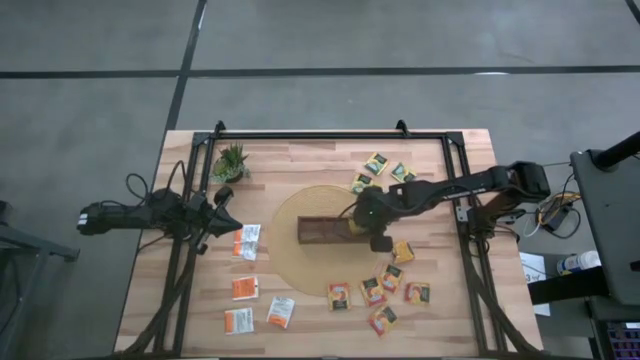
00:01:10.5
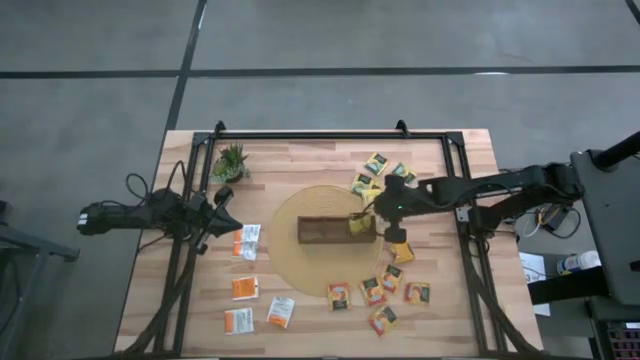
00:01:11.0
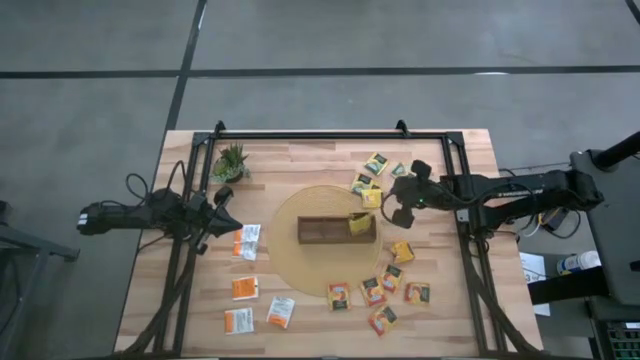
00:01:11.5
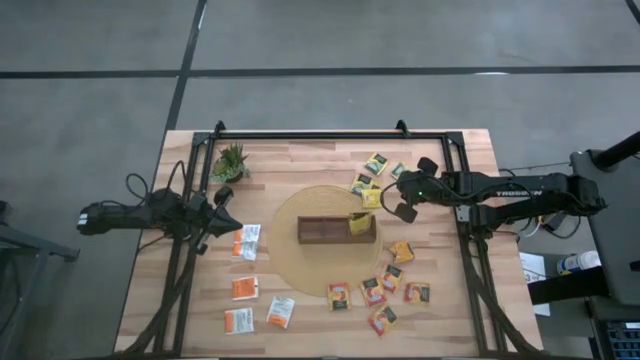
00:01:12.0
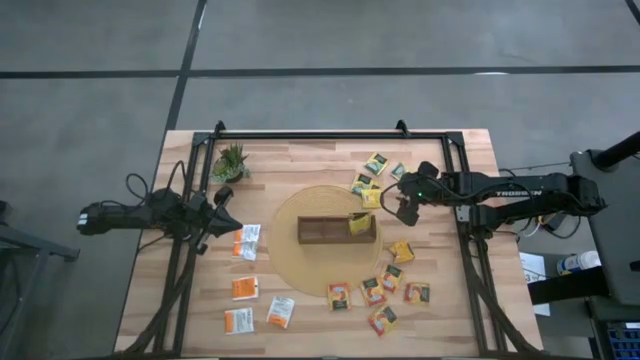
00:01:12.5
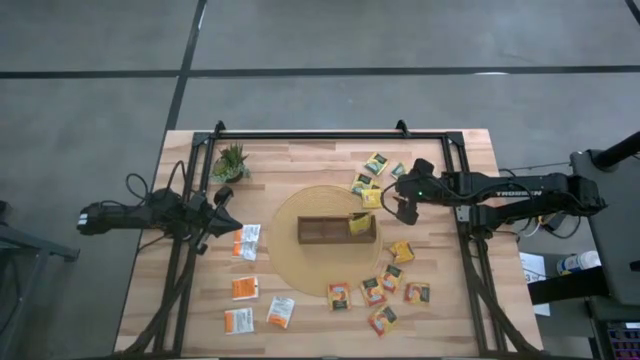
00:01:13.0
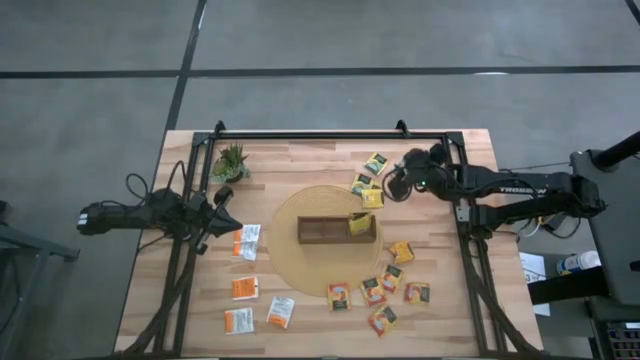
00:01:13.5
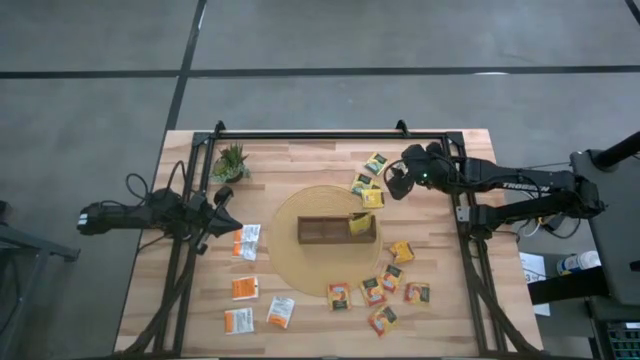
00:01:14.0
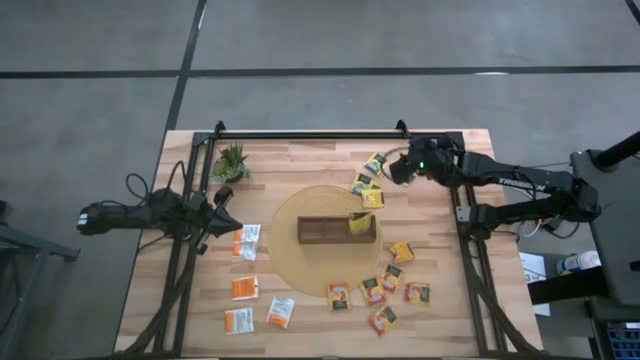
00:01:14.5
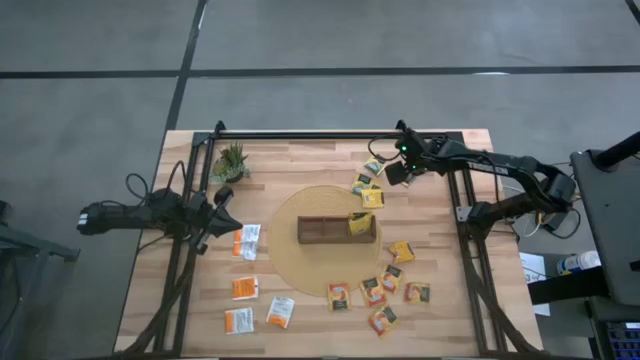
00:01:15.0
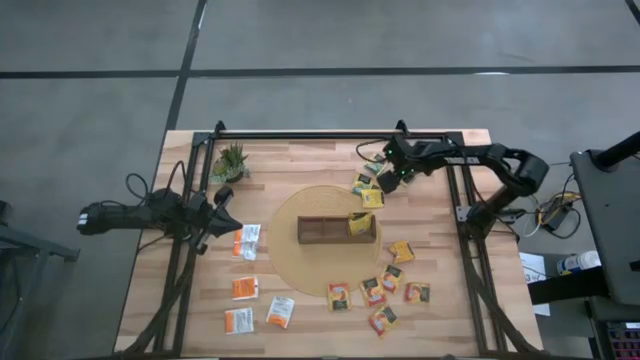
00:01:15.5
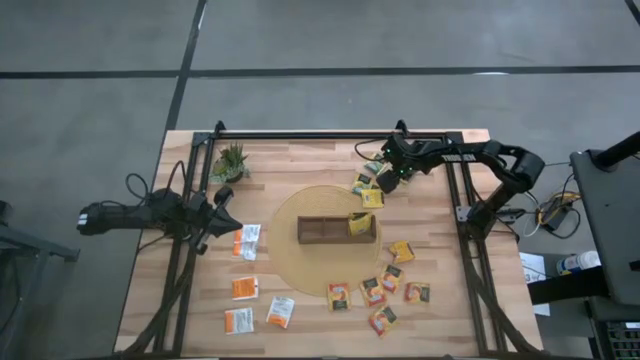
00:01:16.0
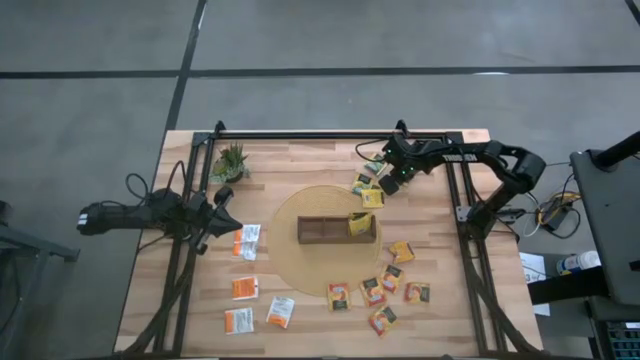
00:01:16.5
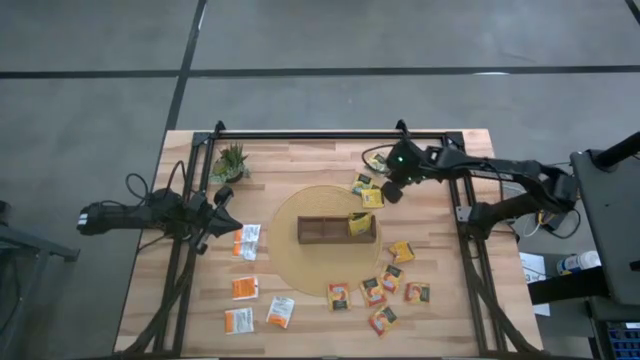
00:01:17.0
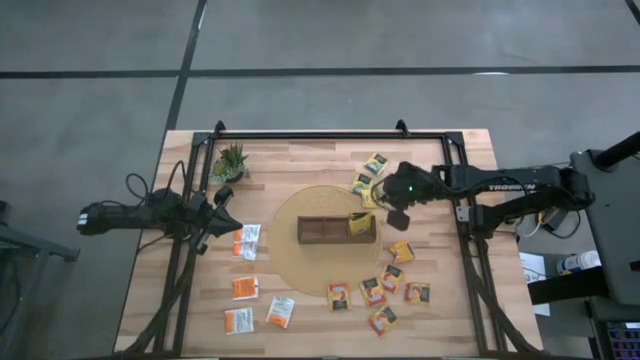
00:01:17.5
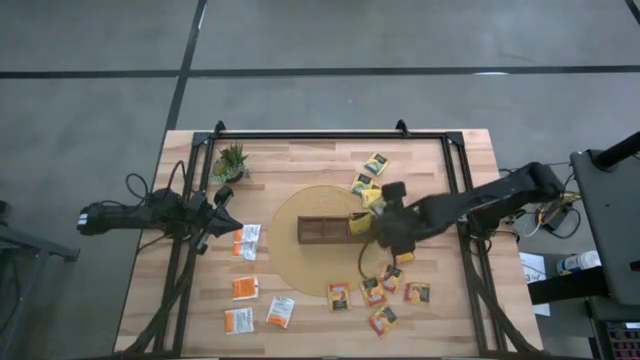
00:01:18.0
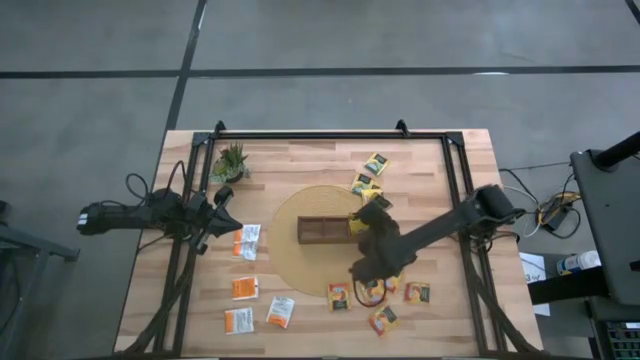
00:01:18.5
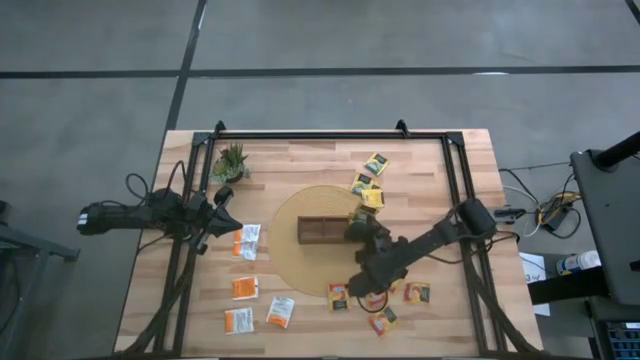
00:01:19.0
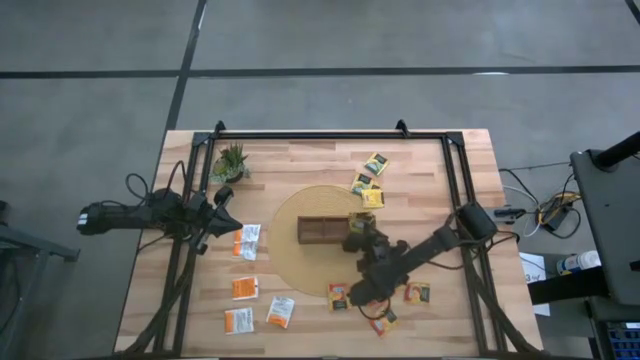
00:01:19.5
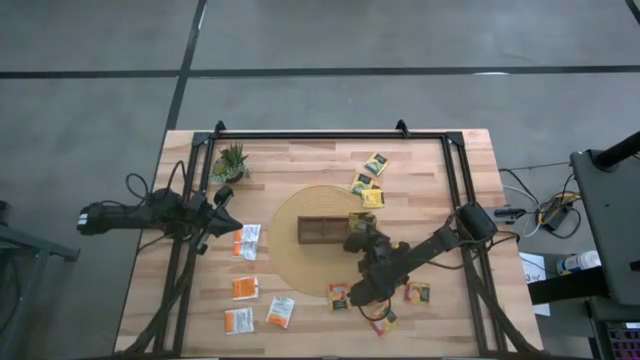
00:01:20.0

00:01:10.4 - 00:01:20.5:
Task: Pick & Place Tea
Put the yellow tea bag into the right of the wooden organizer

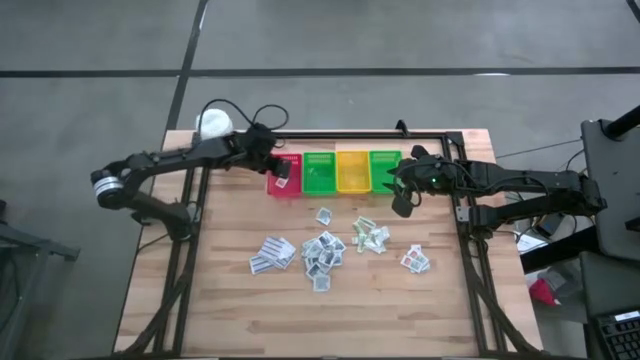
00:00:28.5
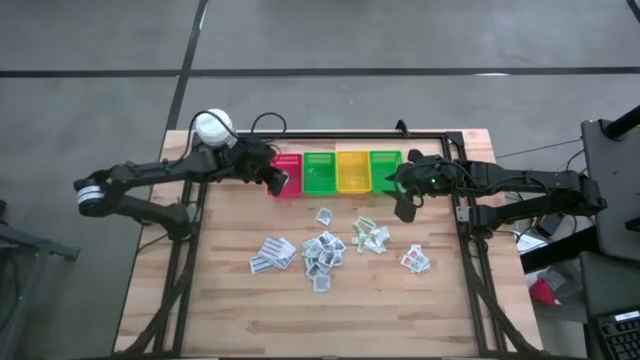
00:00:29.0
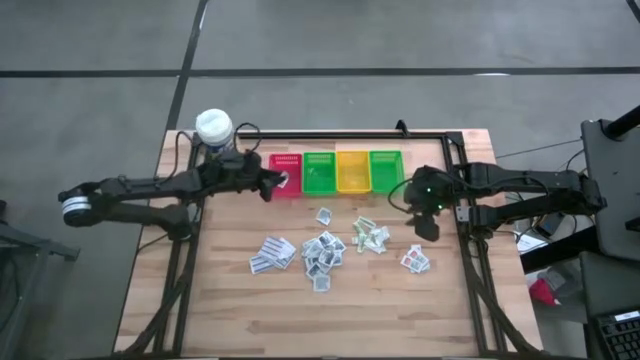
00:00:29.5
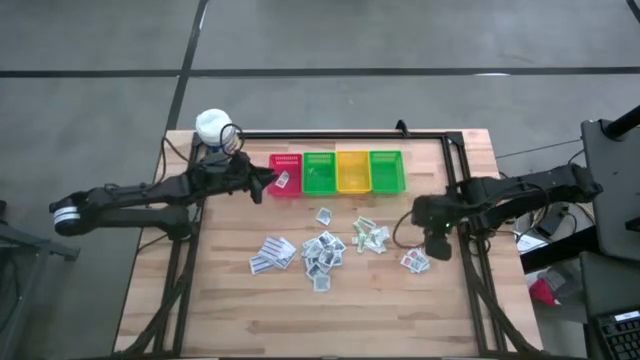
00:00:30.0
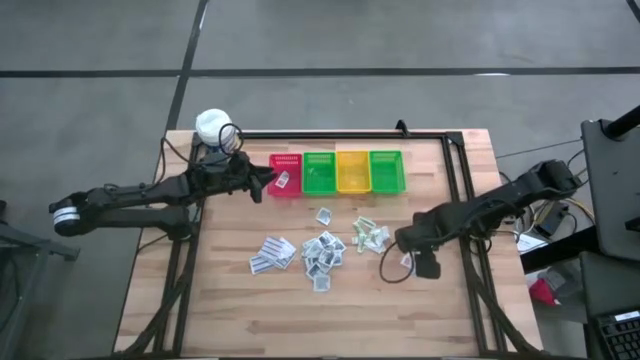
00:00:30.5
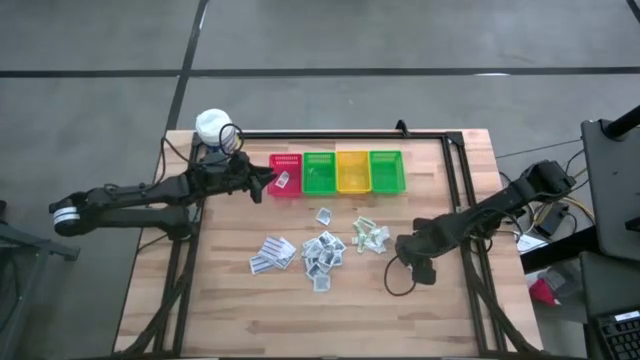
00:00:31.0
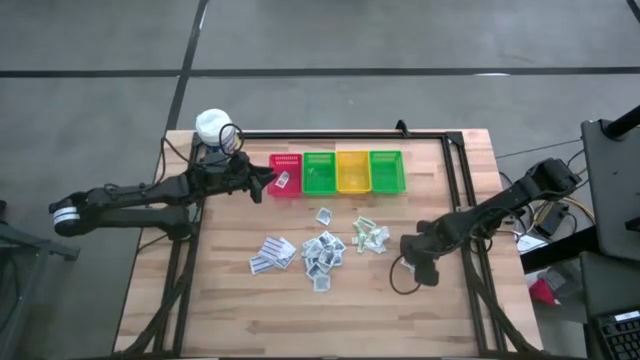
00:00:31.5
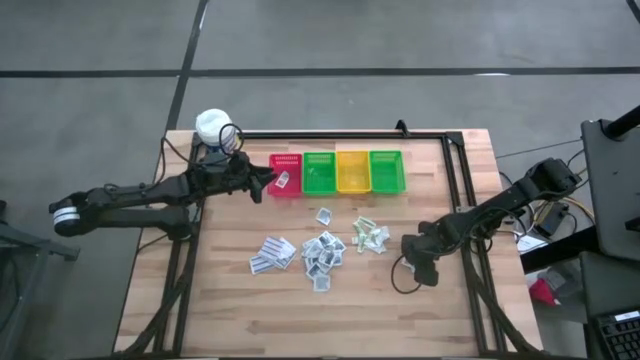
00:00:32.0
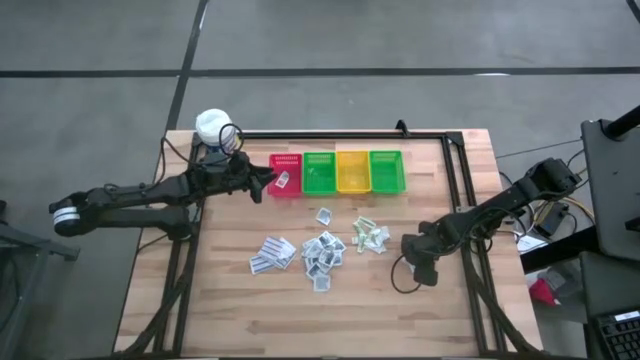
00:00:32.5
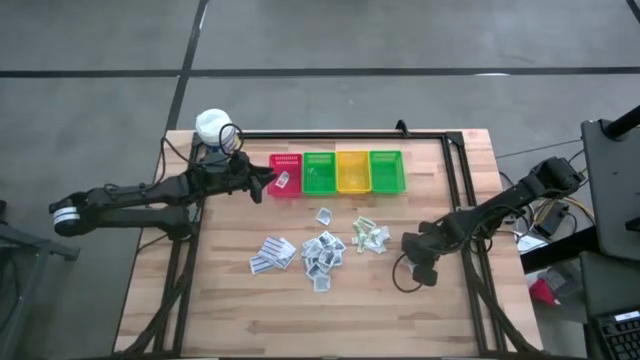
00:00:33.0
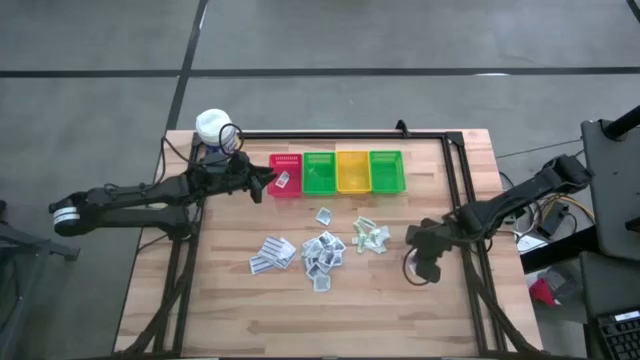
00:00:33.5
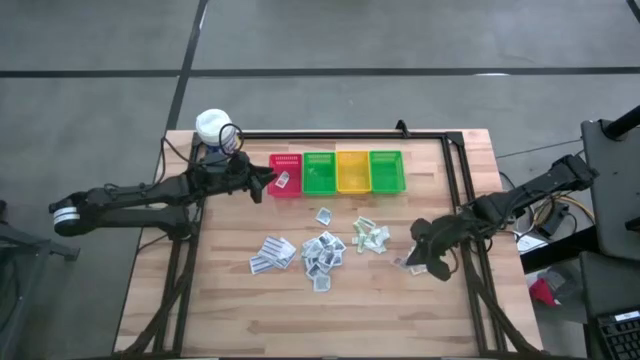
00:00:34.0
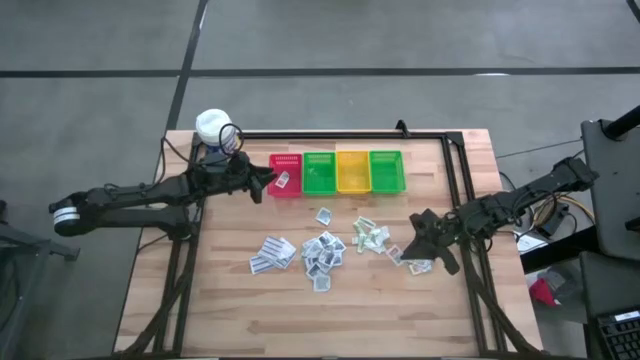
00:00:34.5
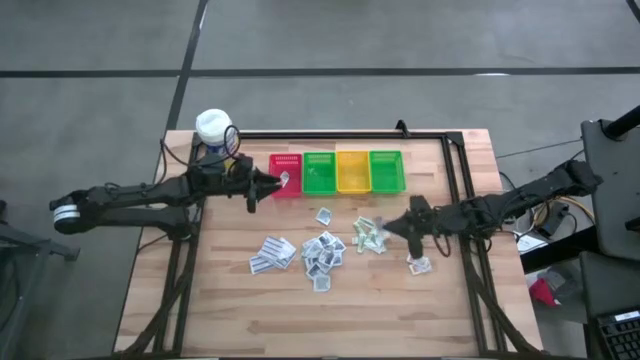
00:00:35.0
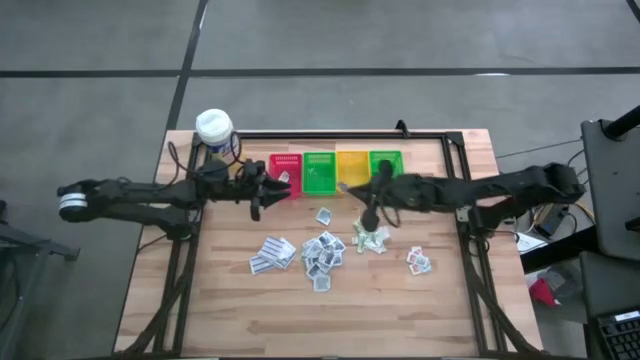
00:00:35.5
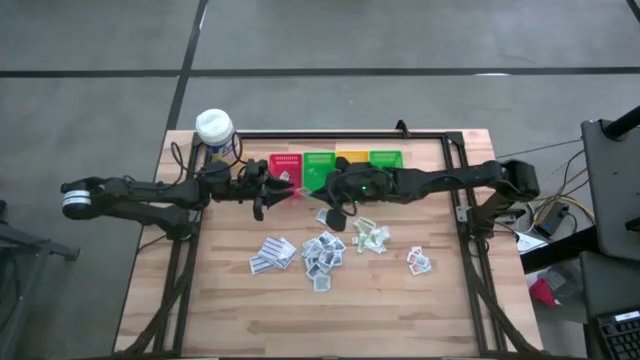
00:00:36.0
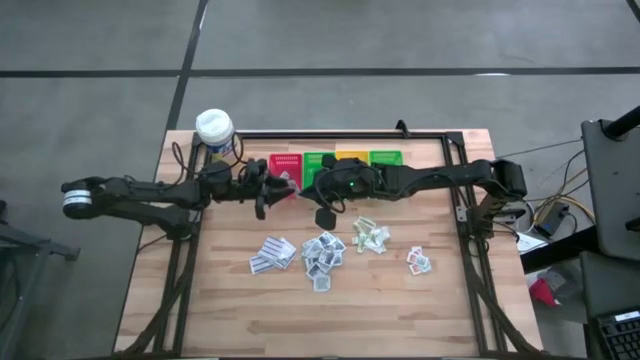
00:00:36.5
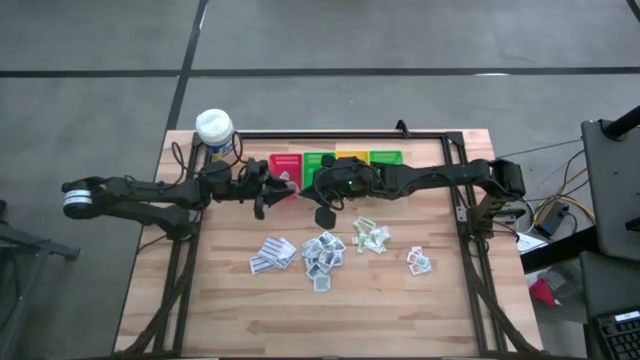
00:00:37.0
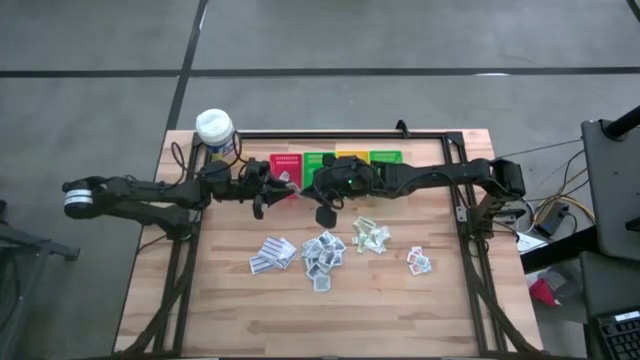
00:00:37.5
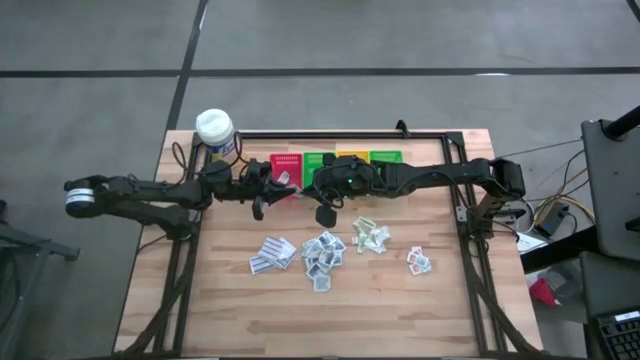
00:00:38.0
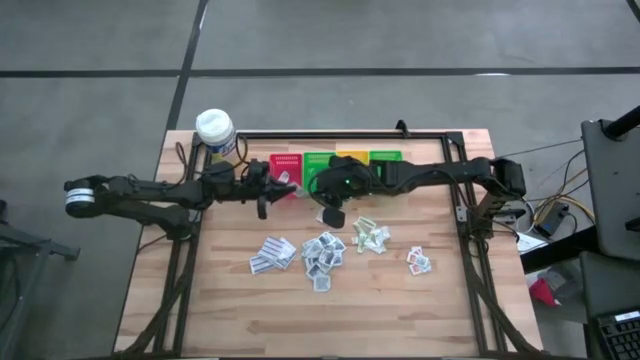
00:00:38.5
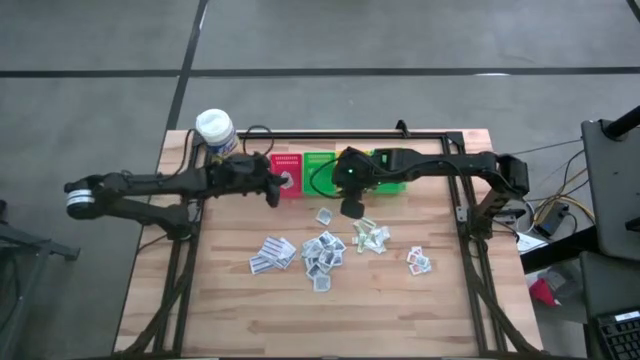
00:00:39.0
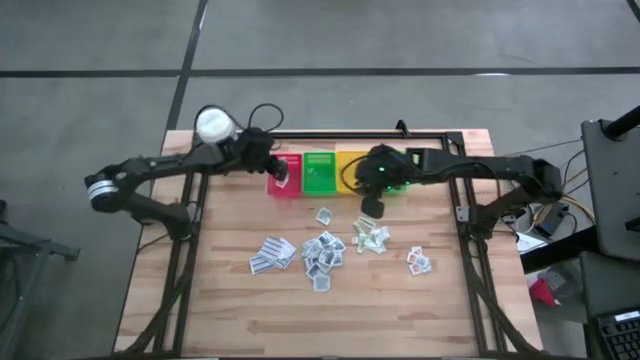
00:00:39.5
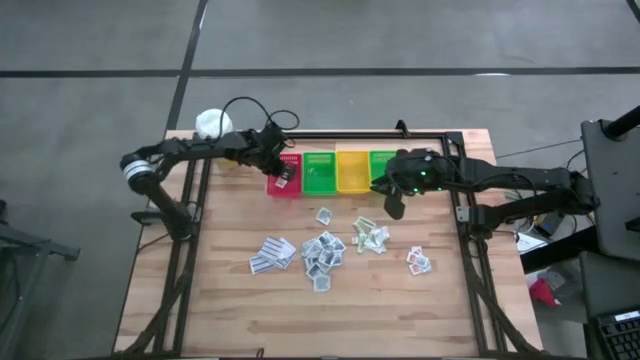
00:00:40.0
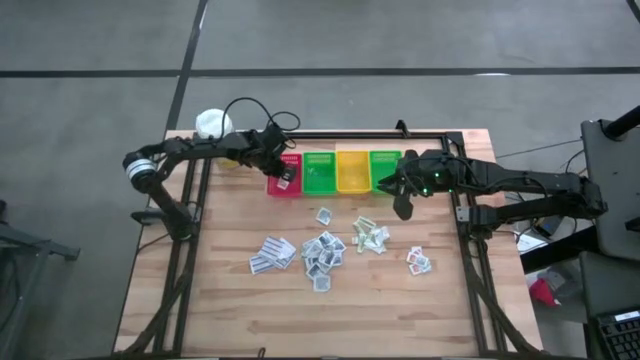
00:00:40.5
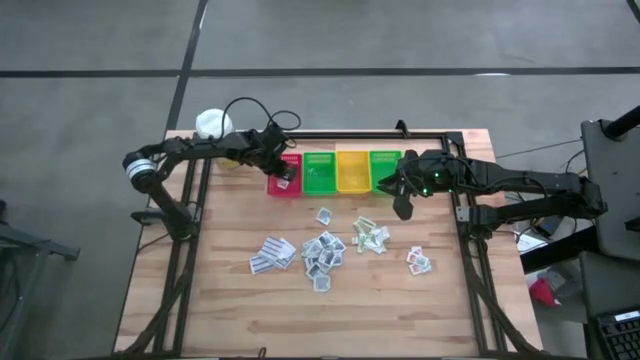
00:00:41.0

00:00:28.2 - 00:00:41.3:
Task: Pick & Place First Aid Supplies
Put the ointment pack into the red bin
